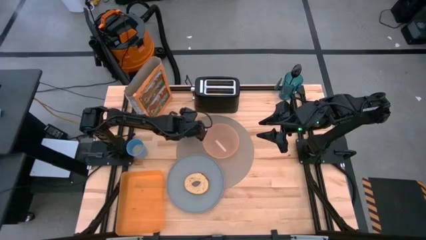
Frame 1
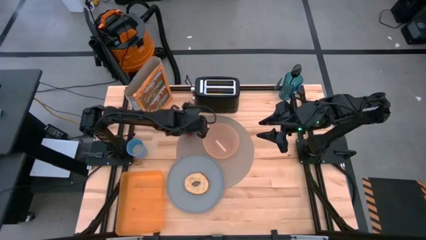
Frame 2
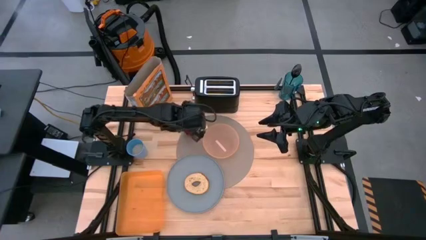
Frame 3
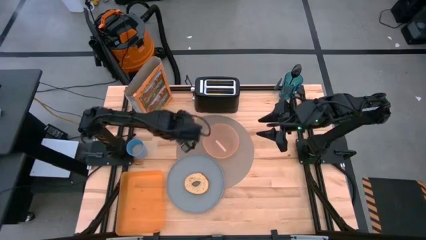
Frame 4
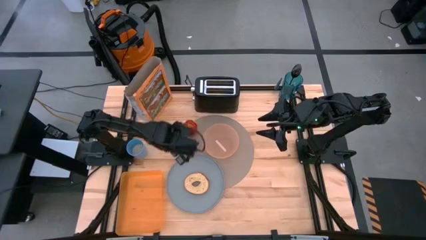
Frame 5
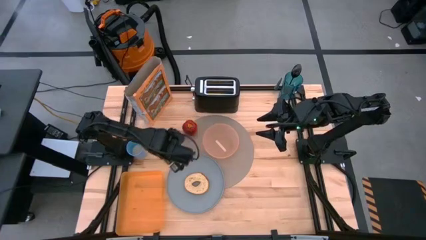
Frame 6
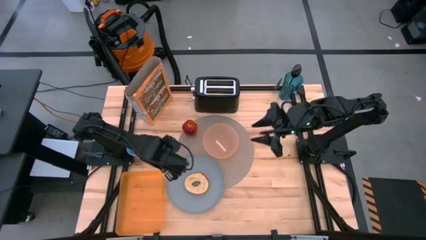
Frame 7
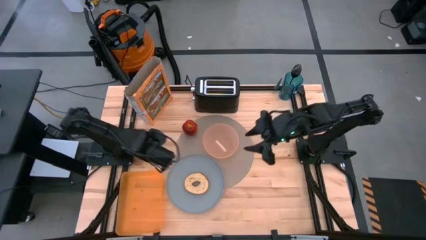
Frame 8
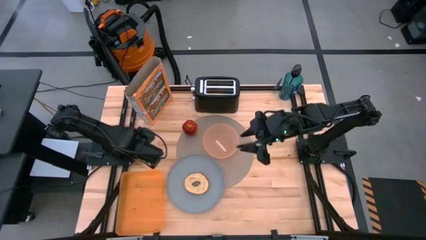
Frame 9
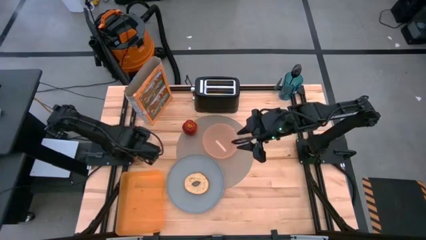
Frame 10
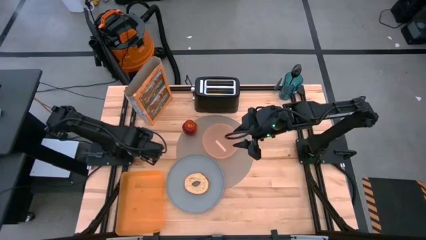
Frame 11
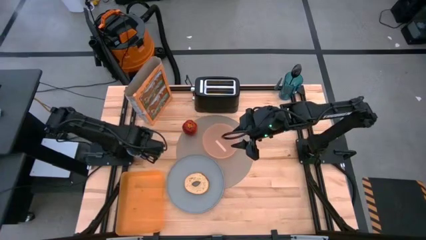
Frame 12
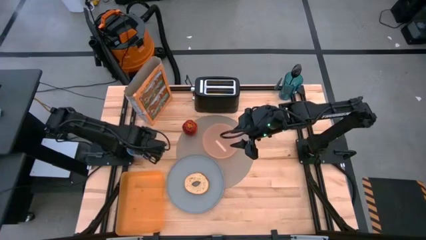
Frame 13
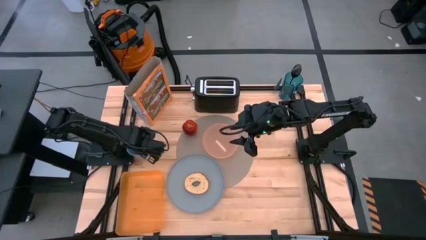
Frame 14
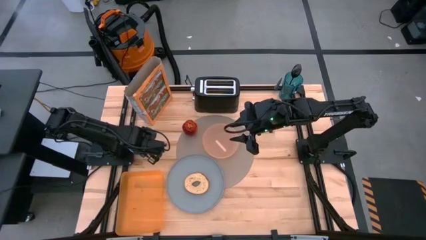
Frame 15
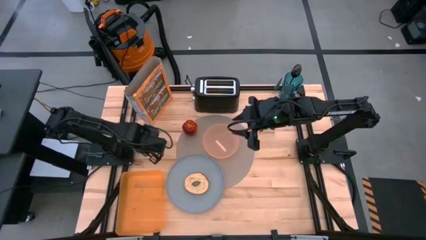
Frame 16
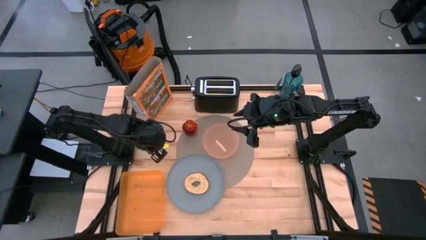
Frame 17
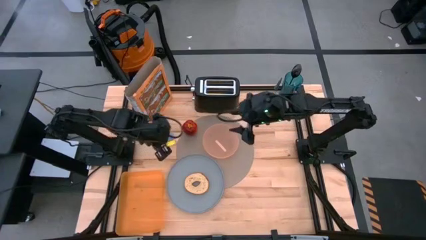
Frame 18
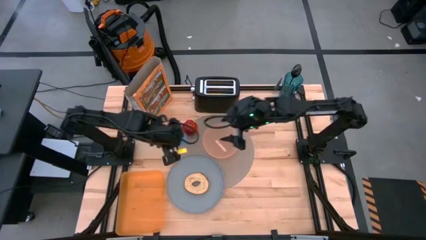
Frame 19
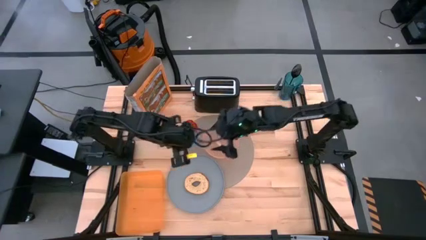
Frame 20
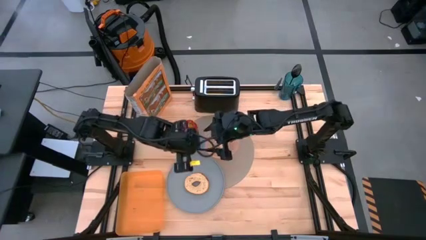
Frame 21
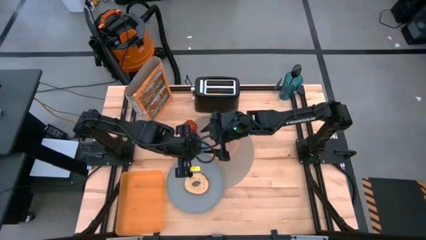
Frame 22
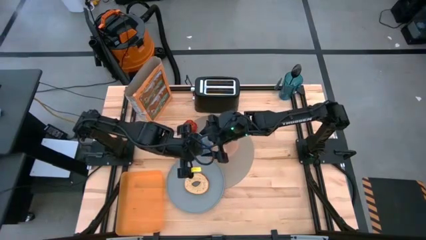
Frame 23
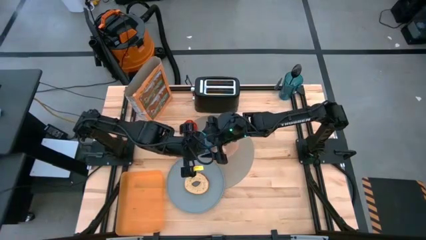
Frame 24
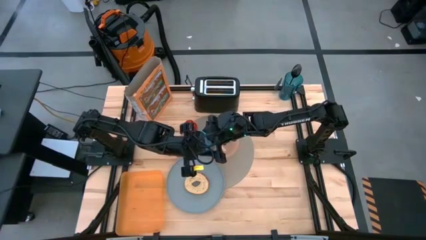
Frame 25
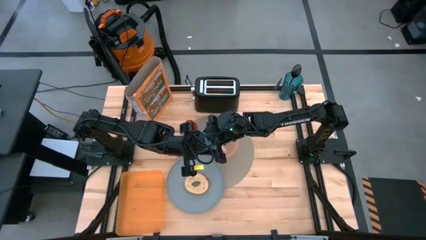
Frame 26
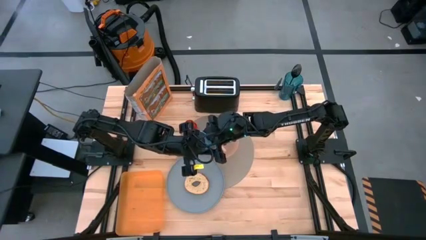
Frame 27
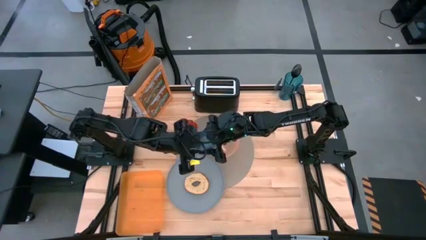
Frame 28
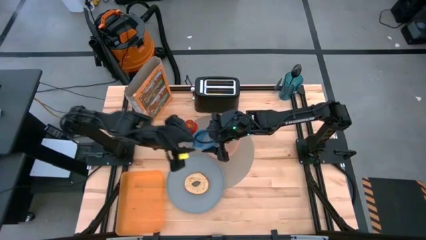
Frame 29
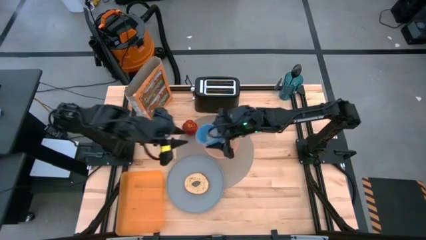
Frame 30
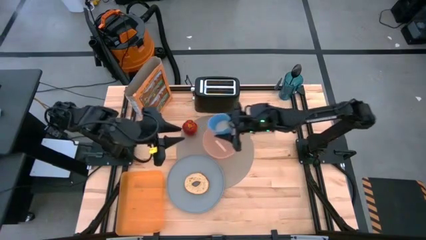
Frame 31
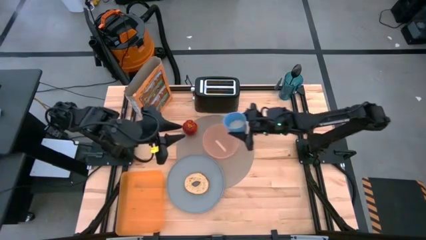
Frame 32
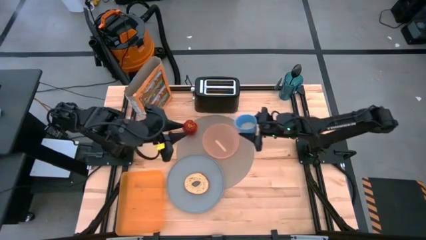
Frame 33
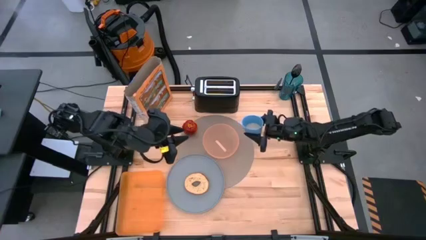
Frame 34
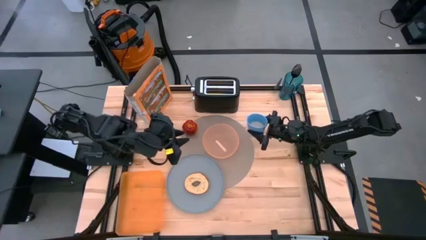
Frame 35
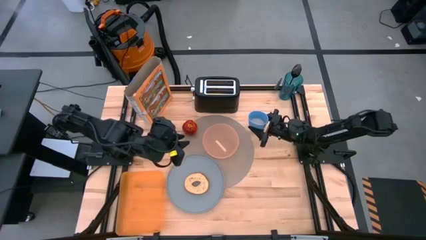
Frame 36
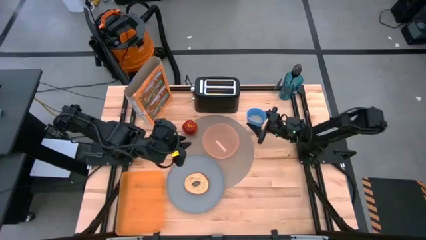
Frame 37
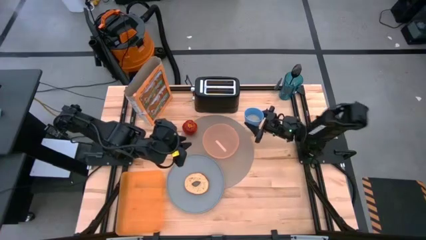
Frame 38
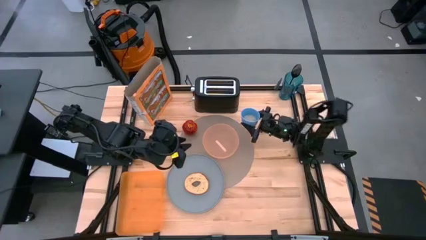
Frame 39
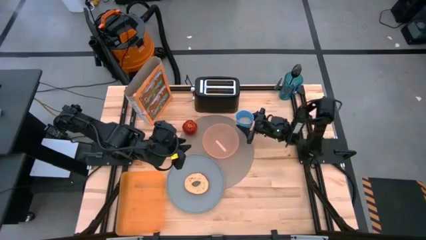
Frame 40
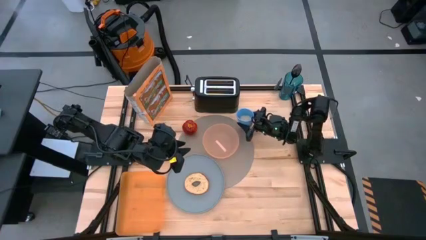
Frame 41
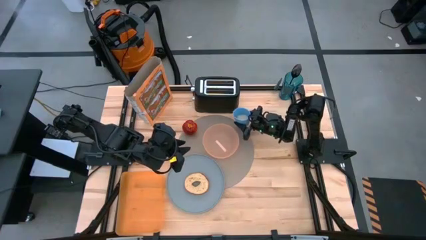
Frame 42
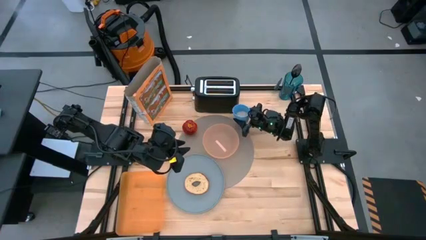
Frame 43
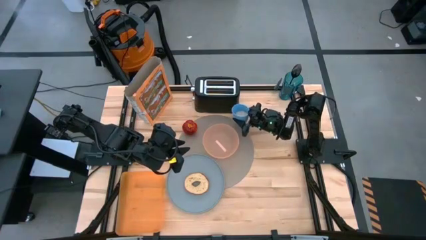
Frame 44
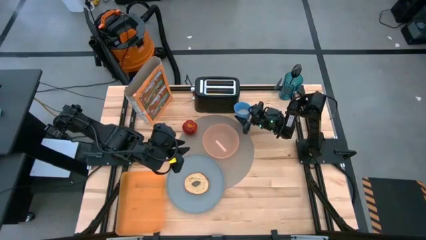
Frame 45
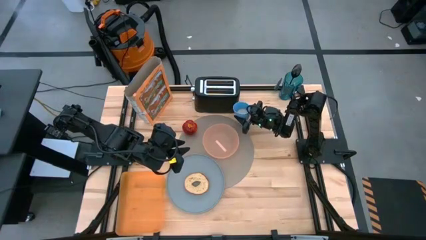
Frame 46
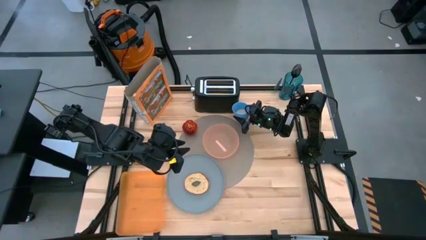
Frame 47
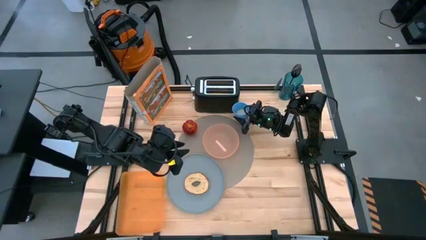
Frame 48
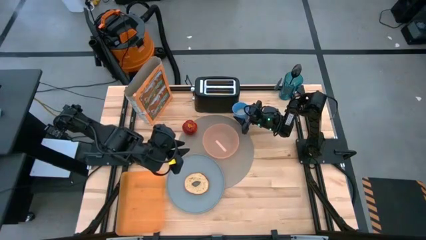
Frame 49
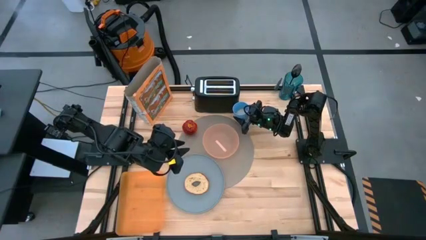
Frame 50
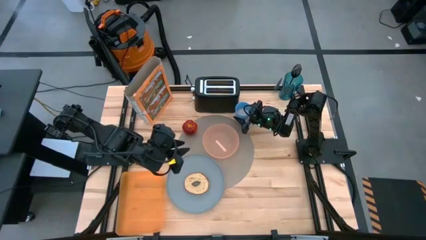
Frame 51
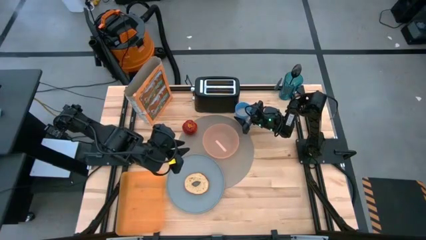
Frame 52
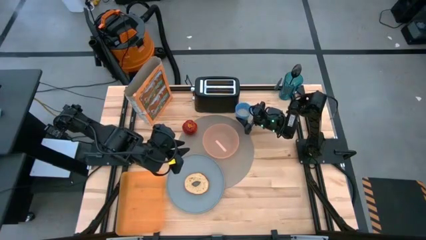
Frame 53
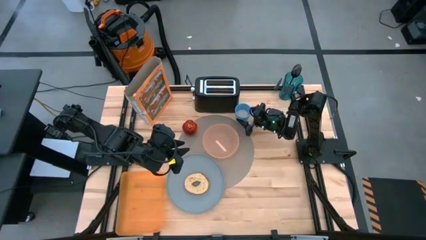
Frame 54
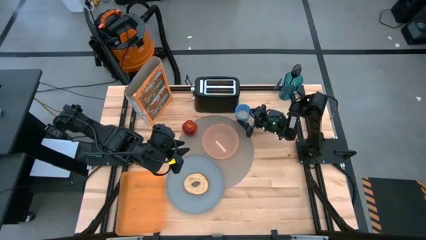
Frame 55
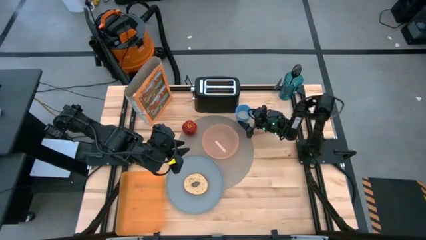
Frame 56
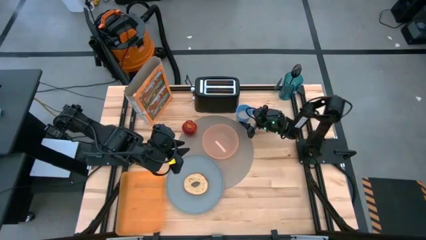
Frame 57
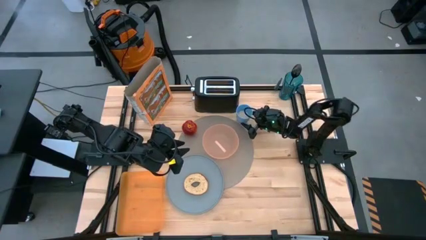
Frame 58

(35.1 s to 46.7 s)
Task: Arrange a breakfast setting
Put the blue cup of milk to the top right of the gray tablemat

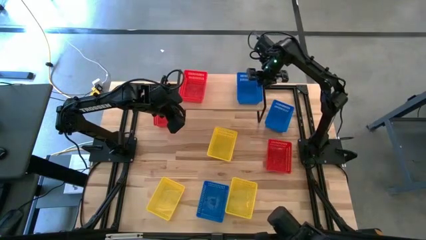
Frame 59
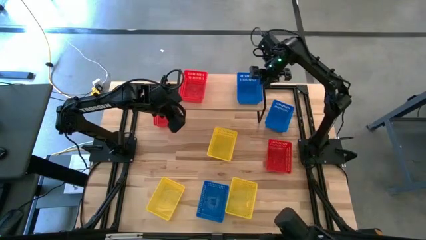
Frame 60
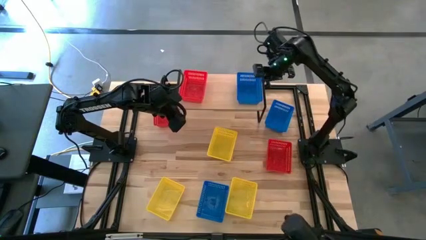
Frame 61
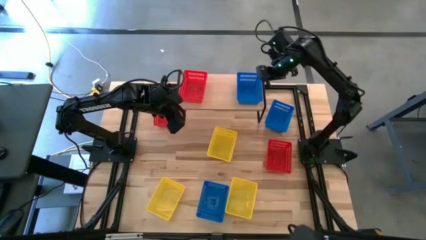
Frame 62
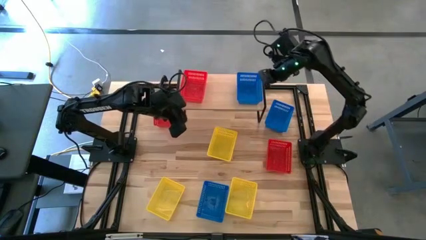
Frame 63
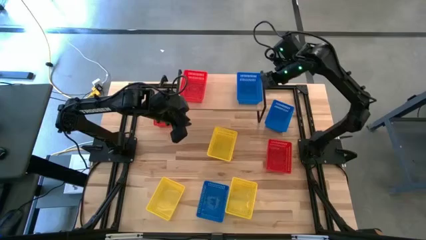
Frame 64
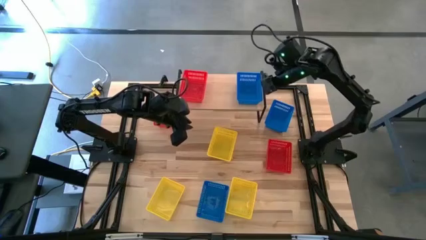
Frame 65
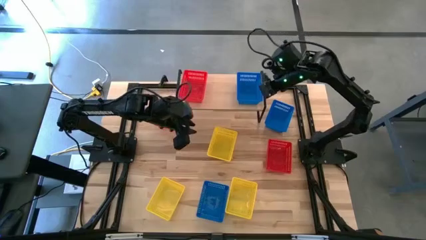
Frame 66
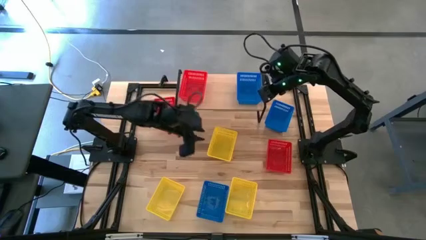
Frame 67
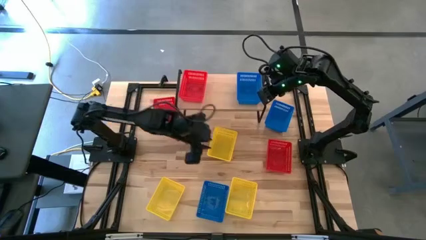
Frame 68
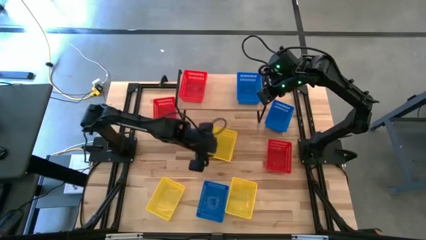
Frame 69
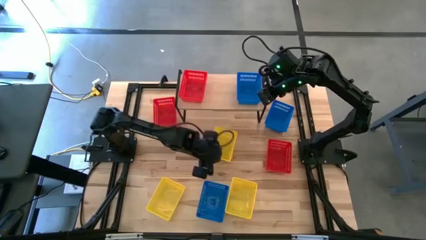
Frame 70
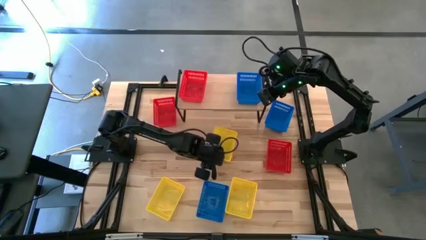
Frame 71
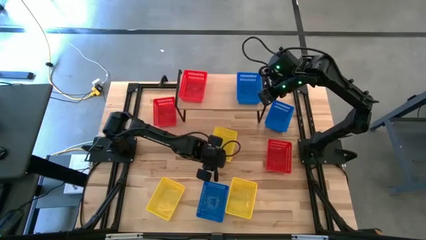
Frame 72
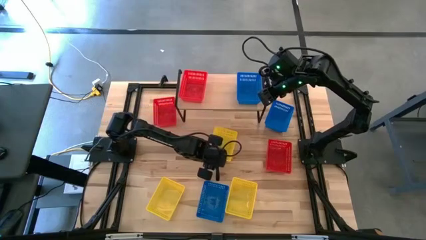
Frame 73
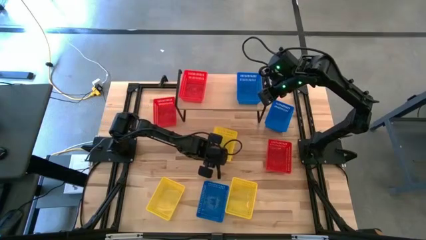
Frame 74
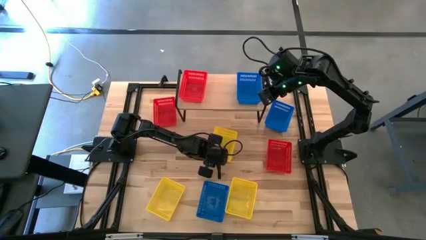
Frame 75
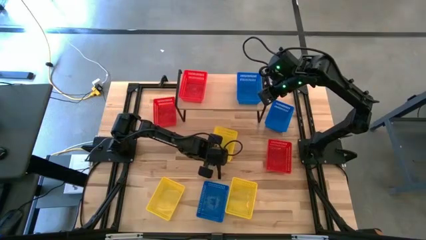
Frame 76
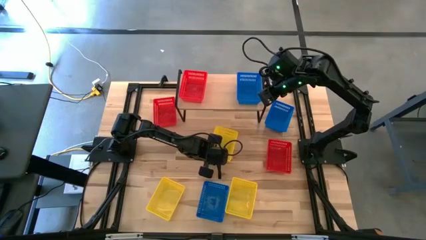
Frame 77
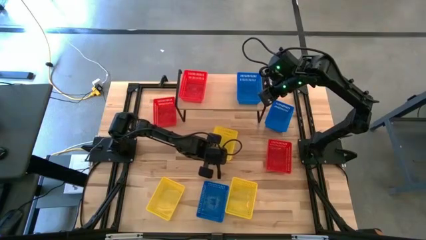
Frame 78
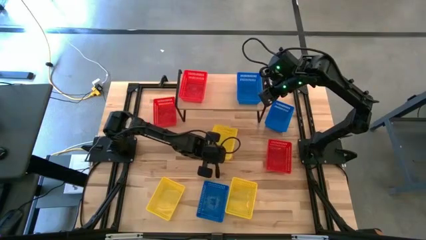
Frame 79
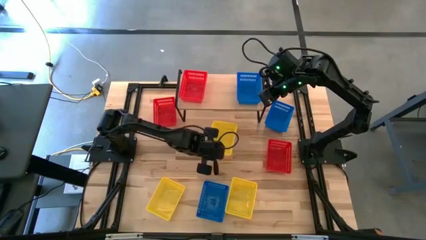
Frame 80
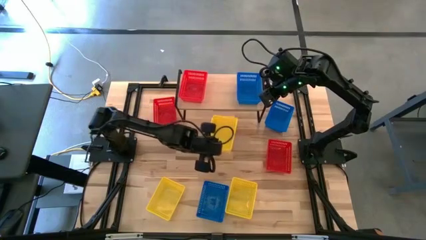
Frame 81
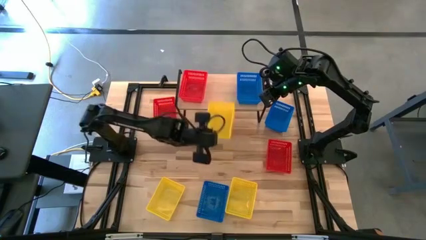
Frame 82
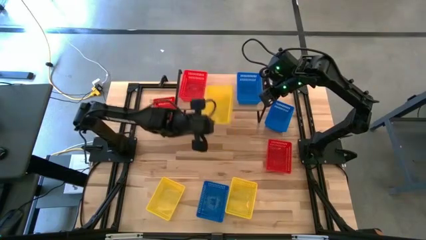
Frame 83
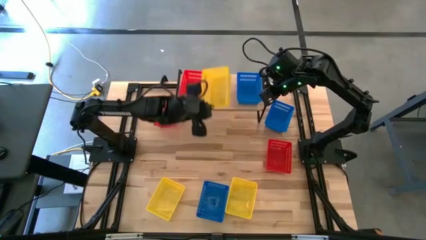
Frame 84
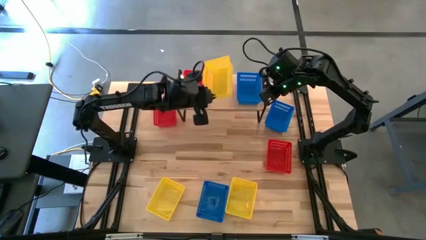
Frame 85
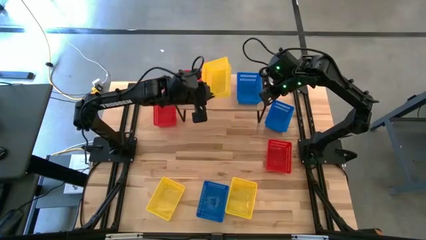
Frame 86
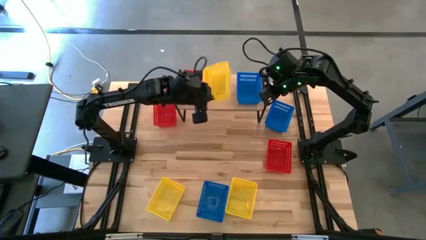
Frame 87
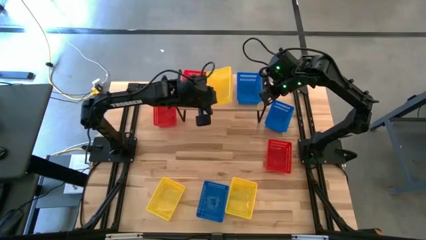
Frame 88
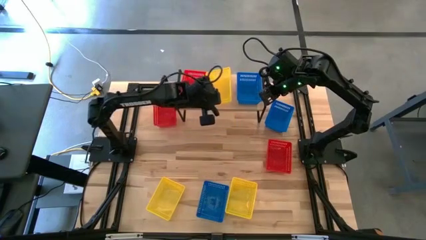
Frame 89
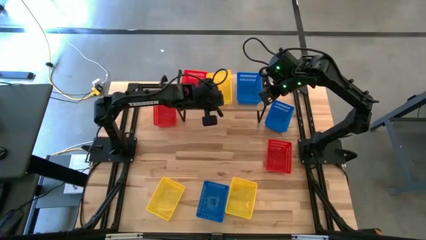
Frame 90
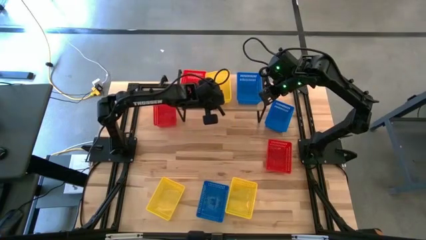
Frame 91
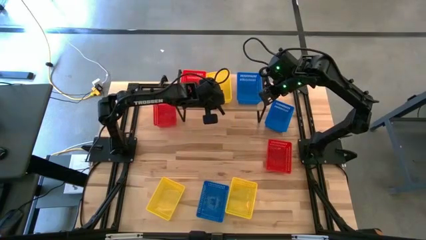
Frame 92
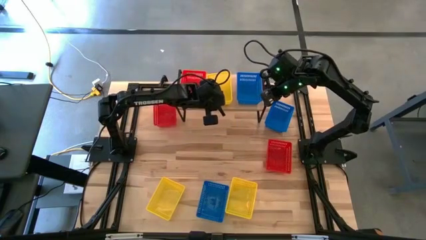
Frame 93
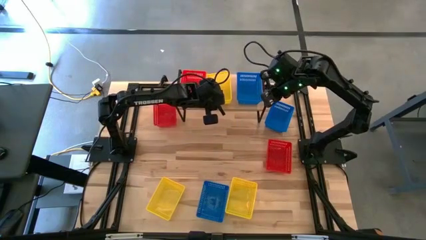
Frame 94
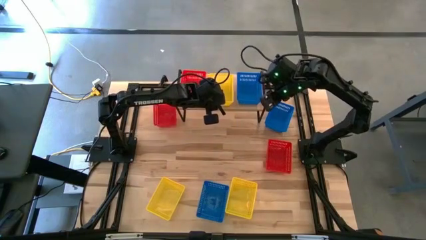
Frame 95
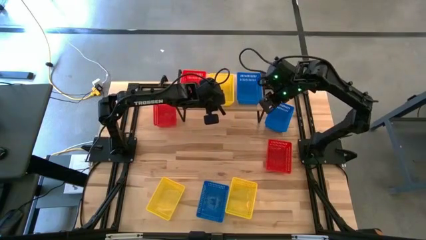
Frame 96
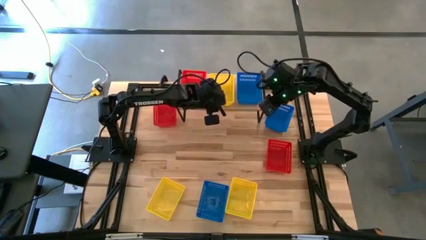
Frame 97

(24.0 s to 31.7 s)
Task: Stack baskets on shelf by color
Put the top yellow bin on the shelf
